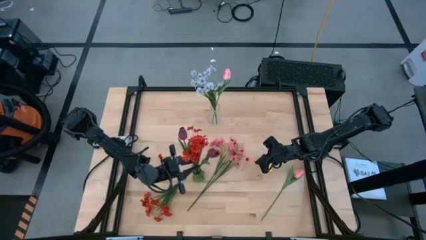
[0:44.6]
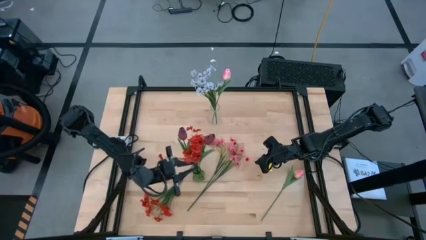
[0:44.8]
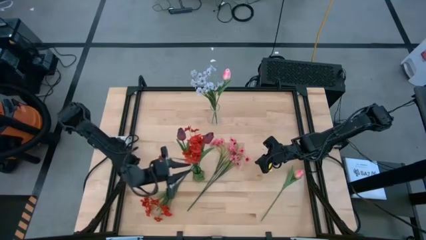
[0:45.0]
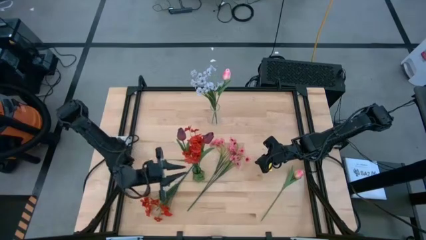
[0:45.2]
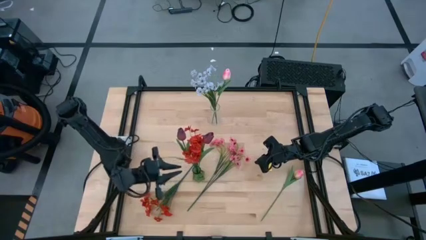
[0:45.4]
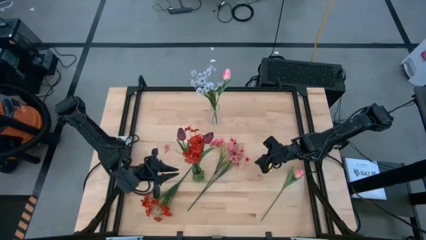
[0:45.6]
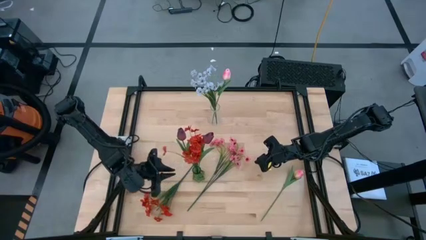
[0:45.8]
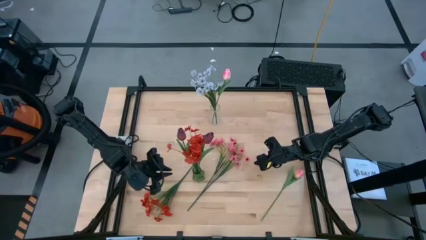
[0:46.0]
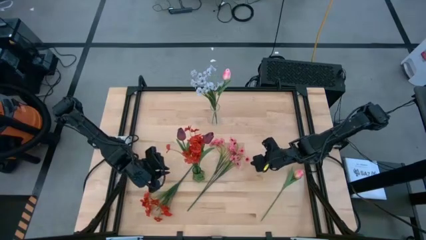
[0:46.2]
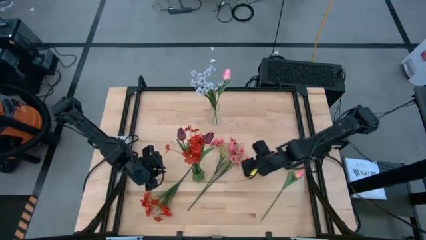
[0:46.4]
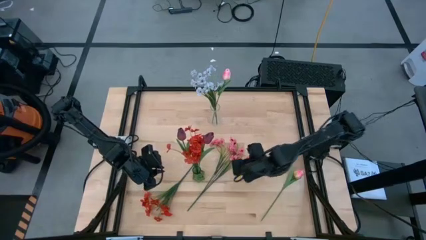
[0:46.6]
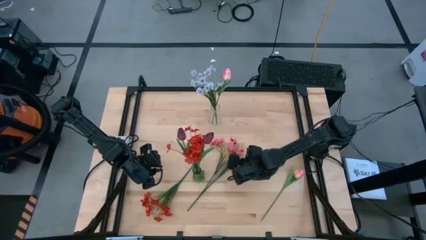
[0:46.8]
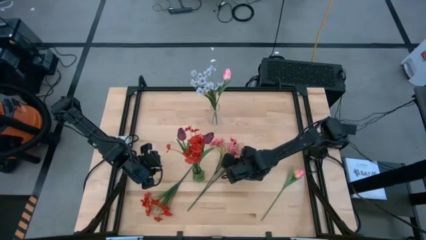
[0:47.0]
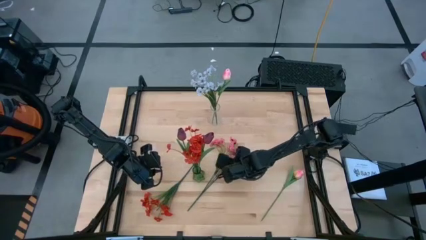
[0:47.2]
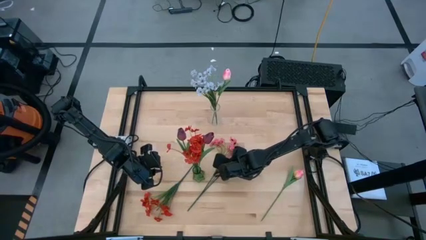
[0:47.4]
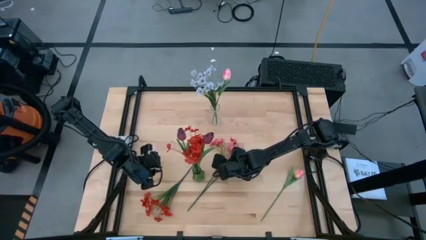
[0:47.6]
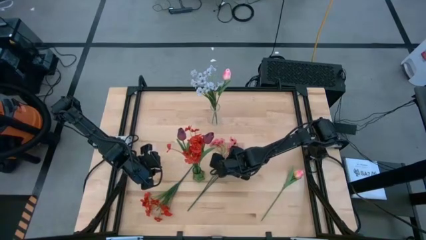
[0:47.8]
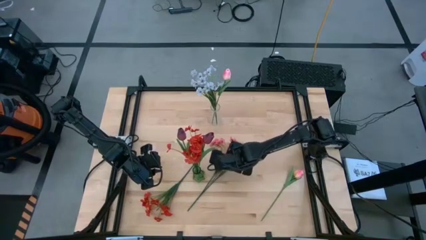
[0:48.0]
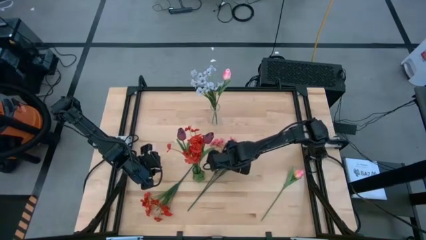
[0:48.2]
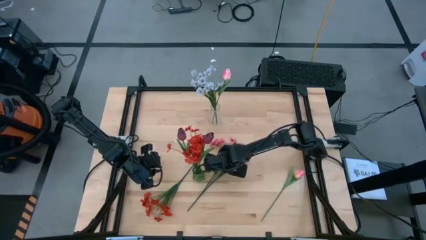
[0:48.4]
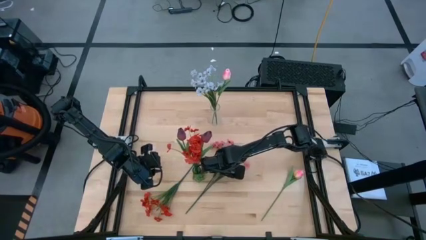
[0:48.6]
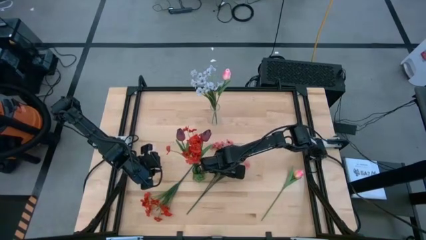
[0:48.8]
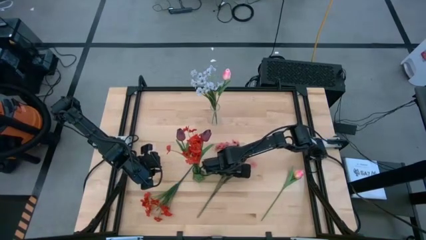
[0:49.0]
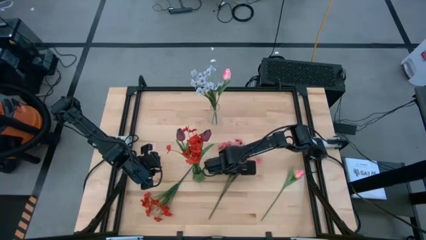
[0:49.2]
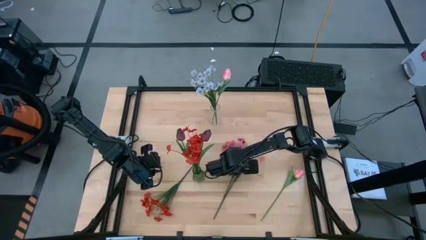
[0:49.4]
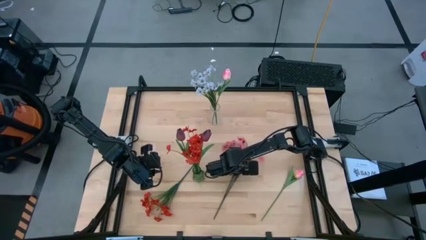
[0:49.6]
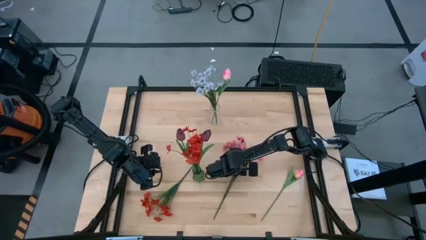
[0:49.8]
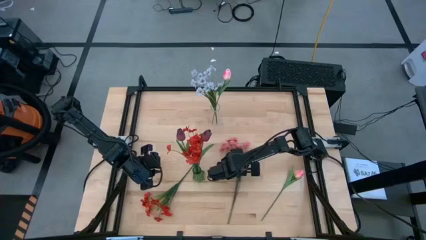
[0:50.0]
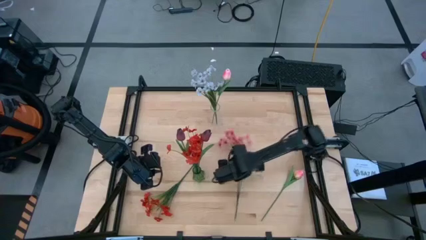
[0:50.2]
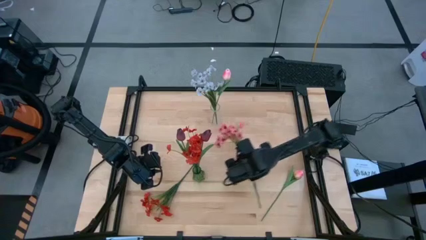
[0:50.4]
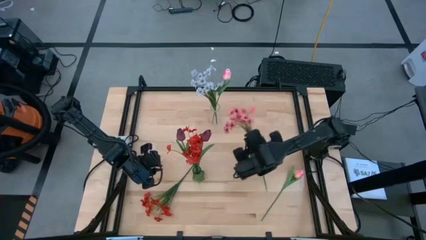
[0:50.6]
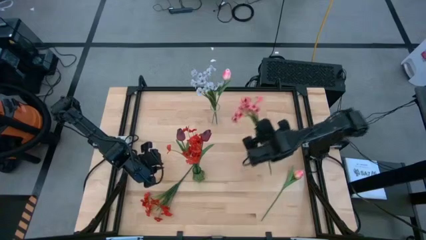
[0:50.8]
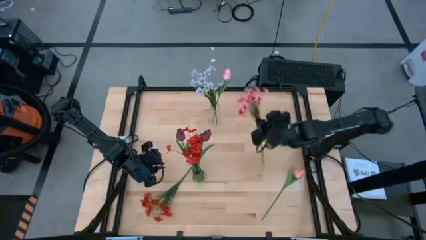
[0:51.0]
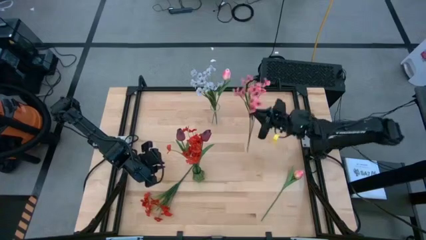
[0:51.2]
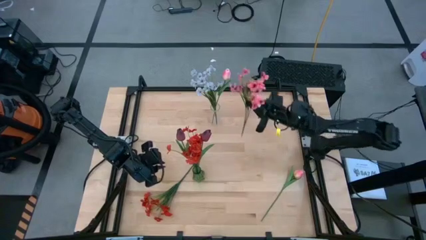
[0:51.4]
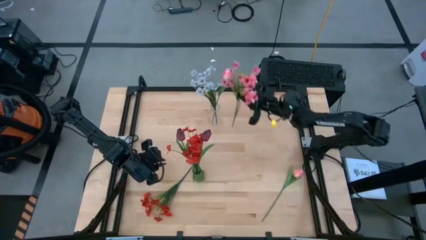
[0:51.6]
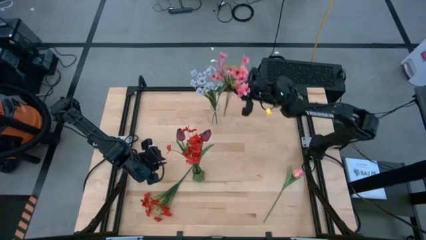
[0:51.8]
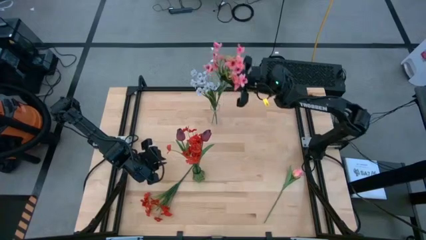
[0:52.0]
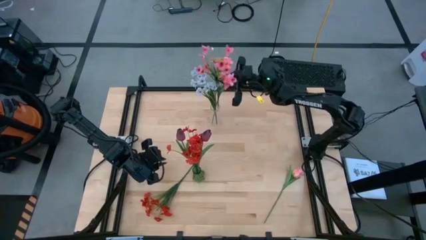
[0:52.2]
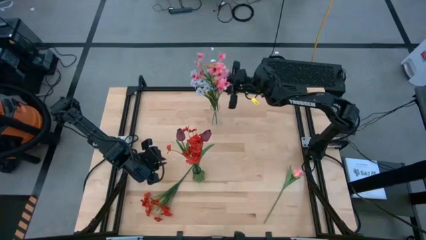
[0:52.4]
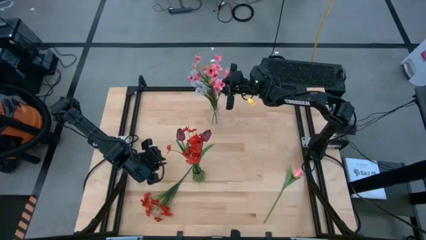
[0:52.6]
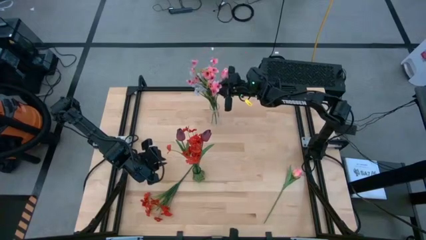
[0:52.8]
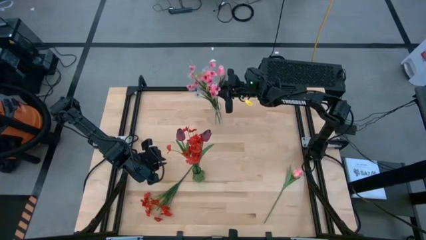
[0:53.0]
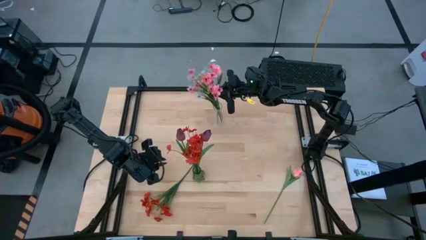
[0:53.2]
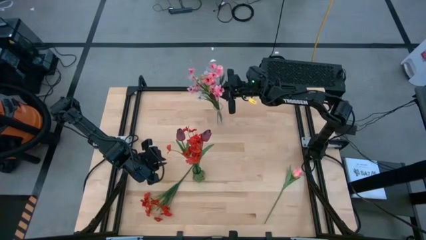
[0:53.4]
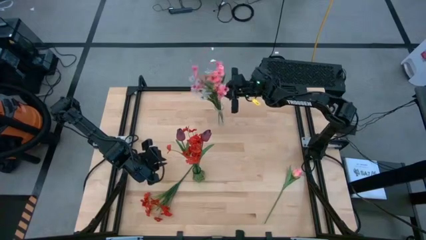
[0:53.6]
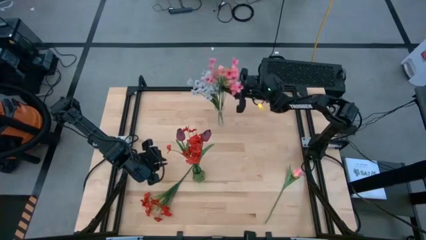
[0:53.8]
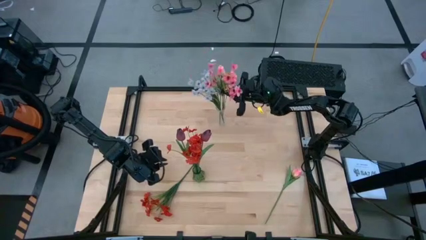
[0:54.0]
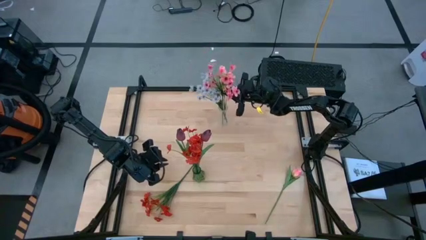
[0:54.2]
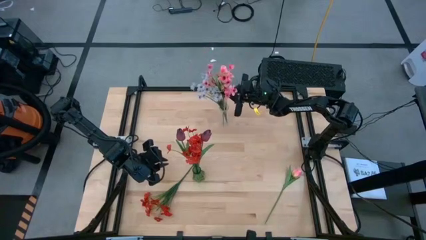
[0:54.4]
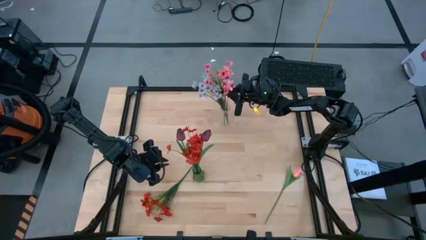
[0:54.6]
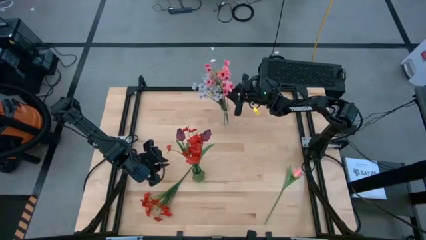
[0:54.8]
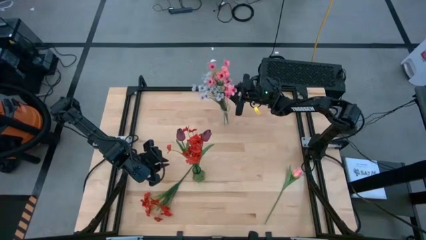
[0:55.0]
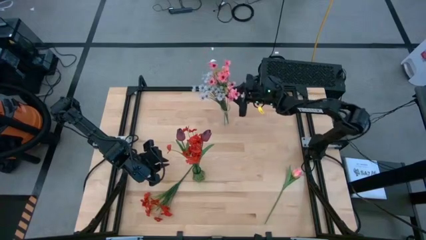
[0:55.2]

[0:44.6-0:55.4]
Task: Sort flowers into vase by color
Put the pink flowers into the transparent flower vase
